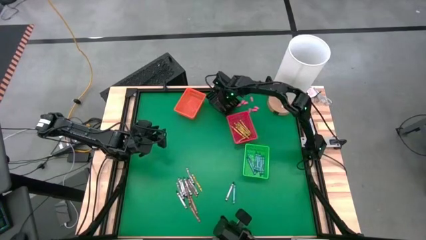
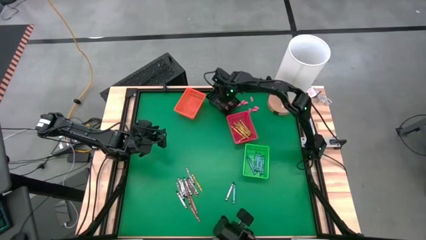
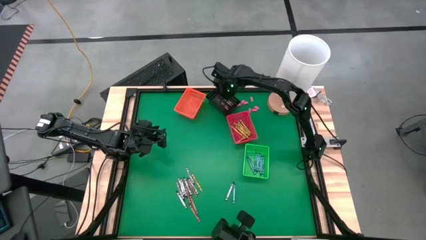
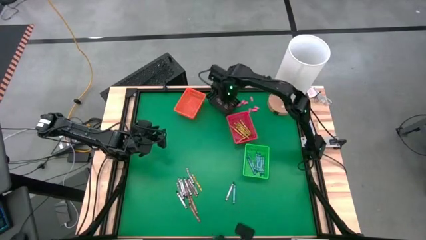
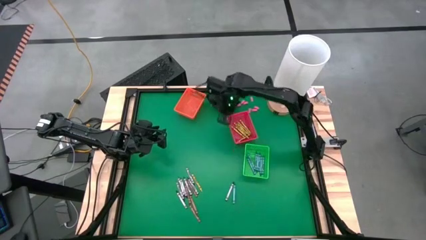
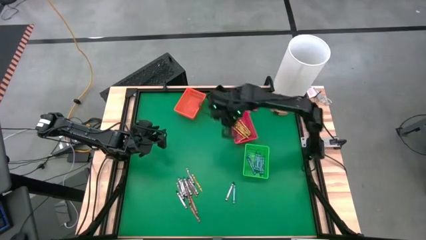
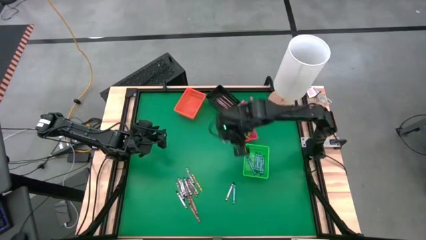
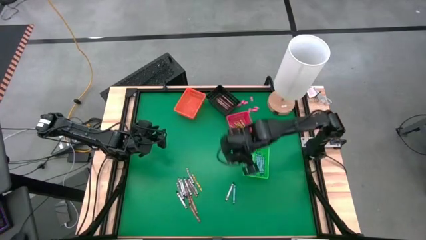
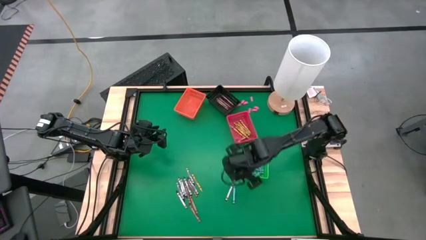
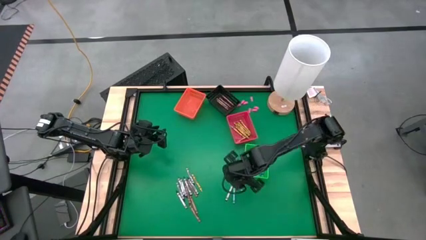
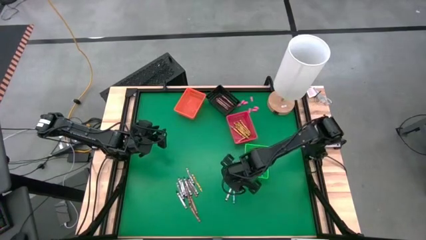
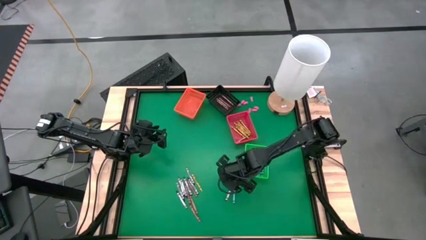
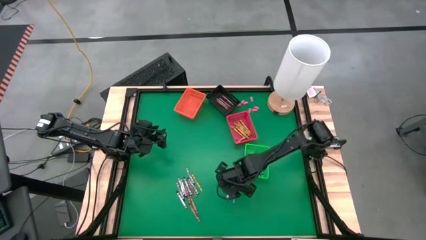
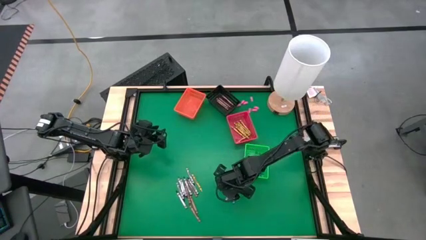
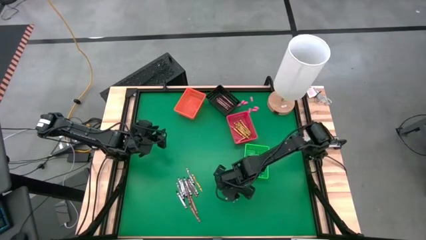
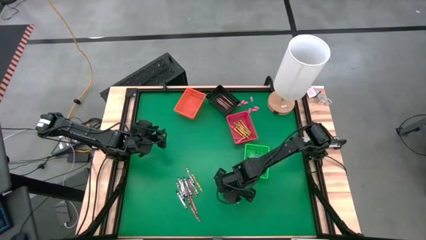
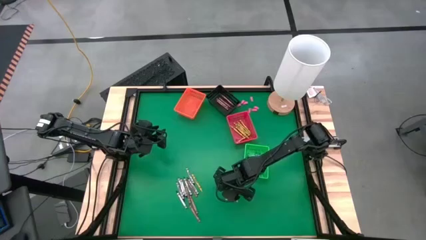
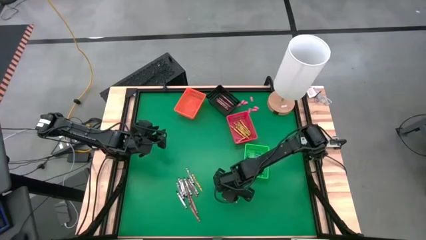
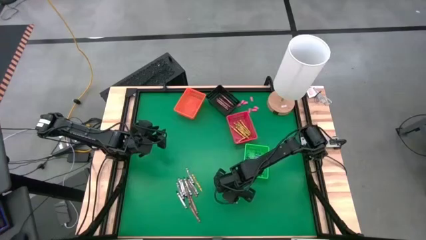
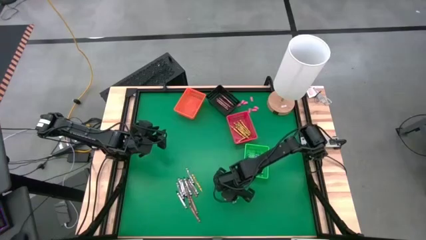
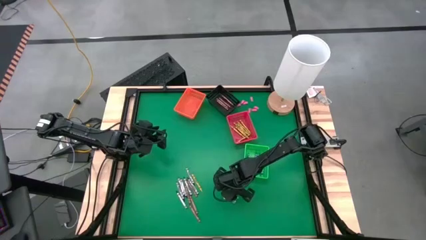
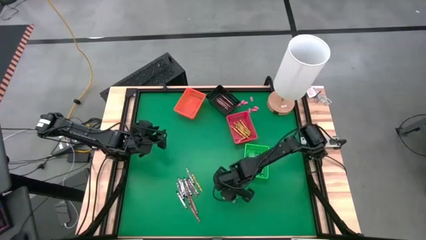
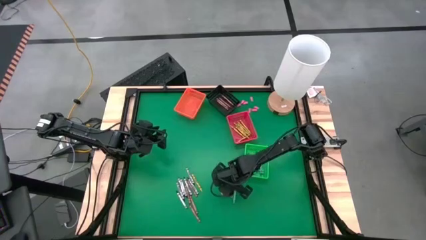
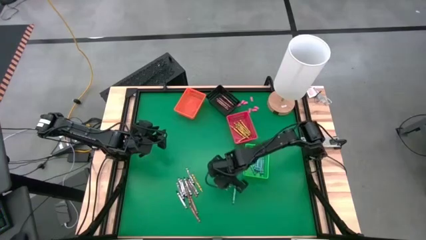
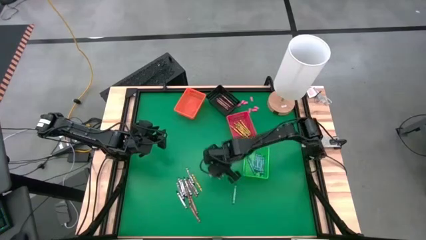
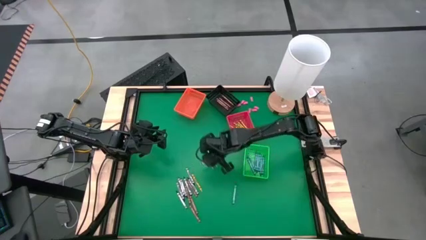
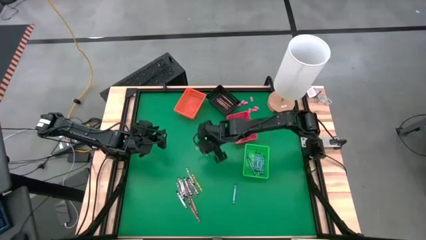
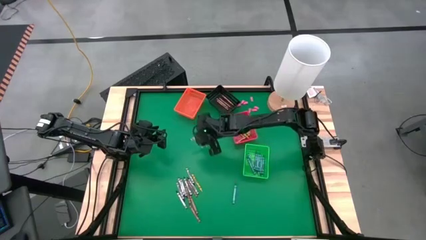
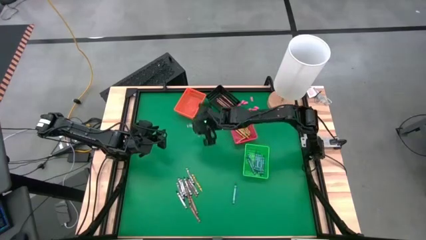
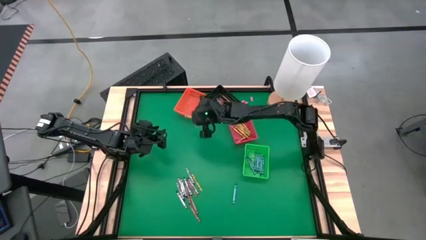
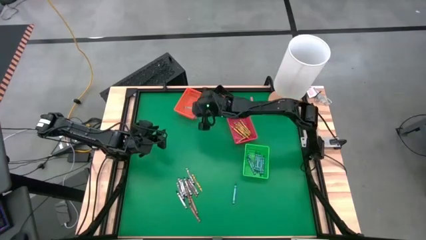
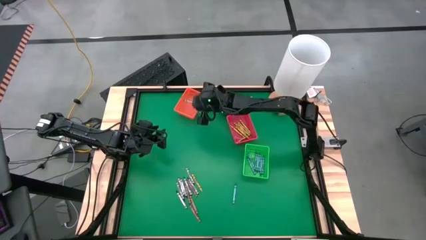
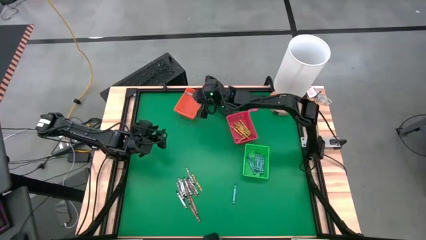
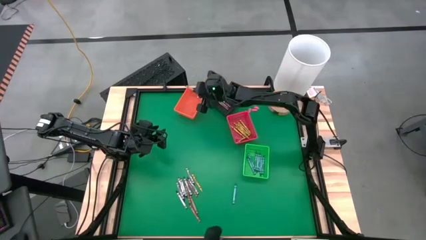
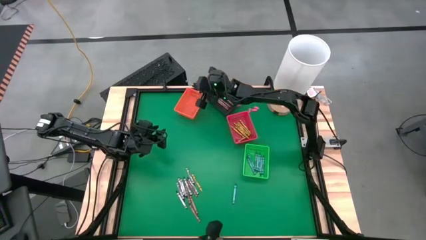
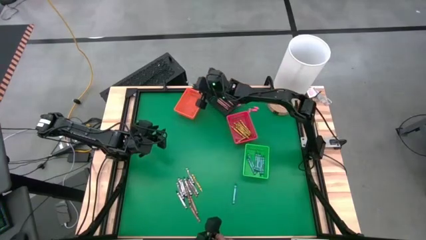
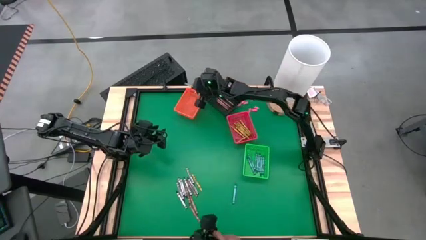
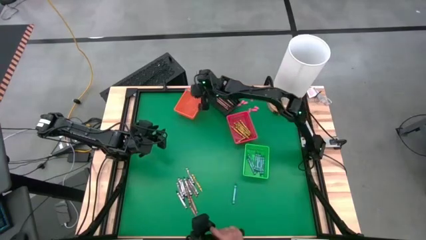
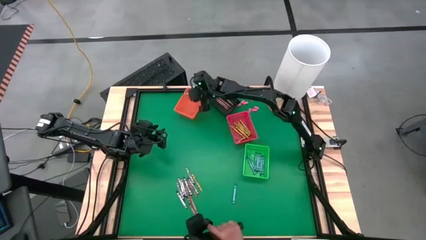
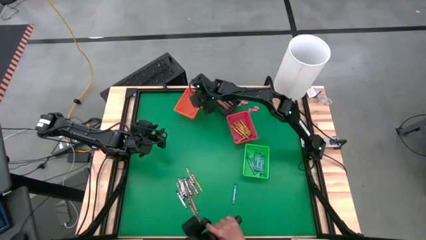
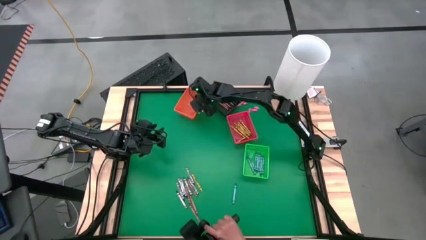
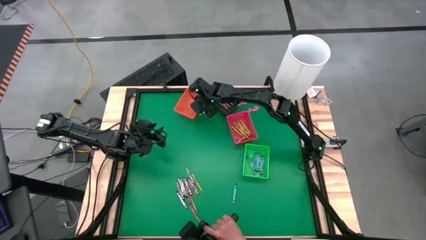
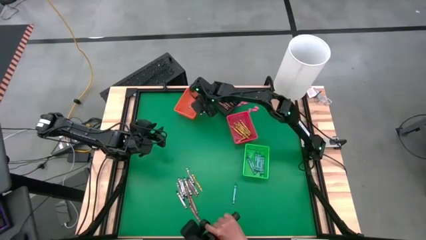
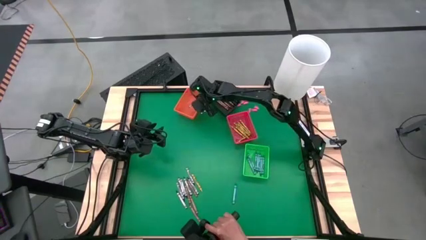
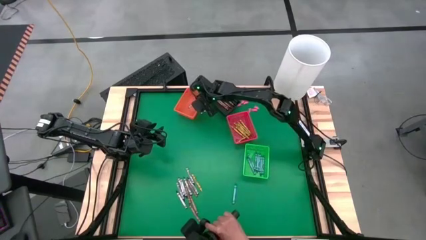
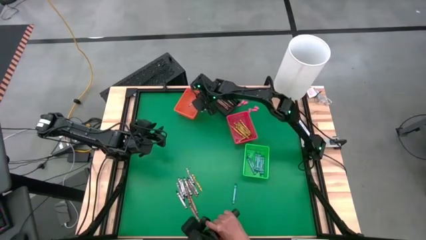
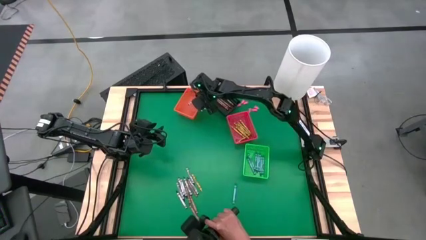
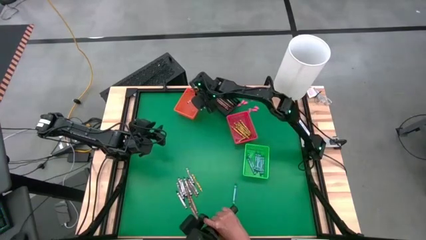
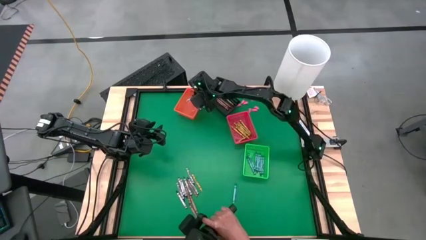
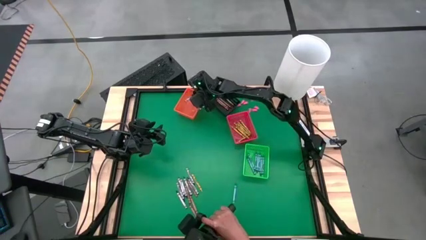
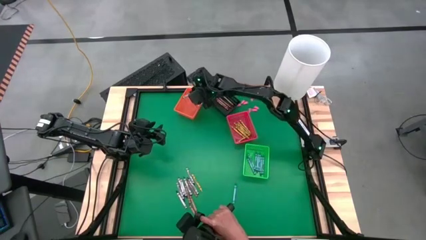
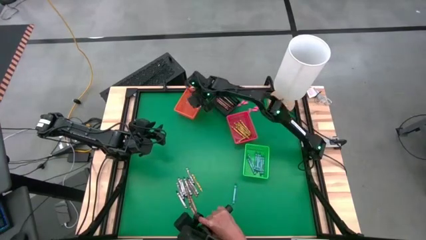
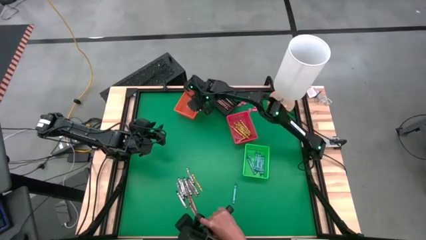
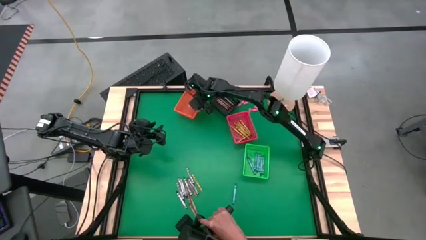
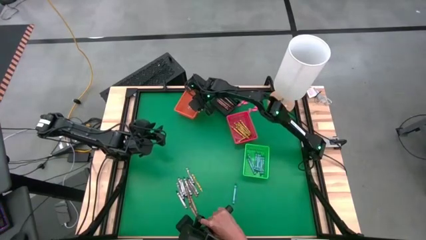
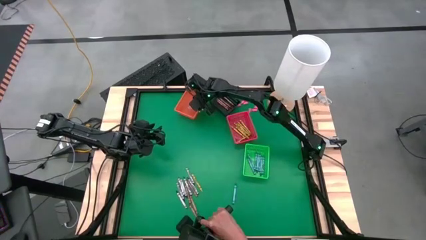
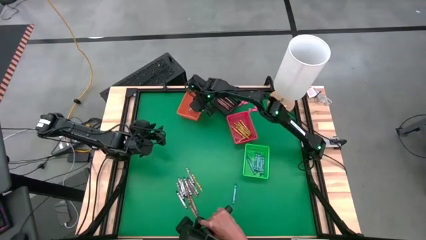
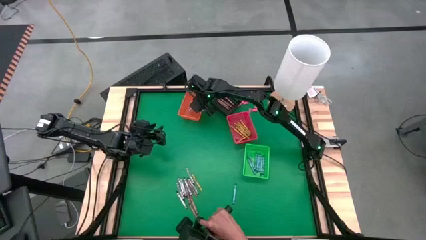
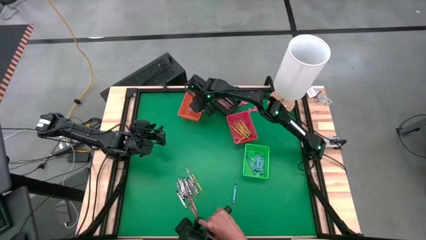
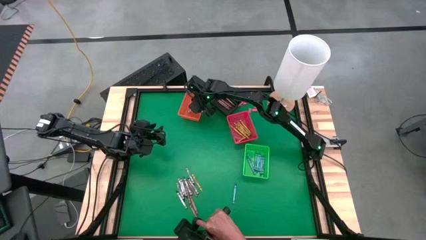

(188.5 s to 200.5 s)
Task: Sort crayons
Put the black crayon into the orange bin
